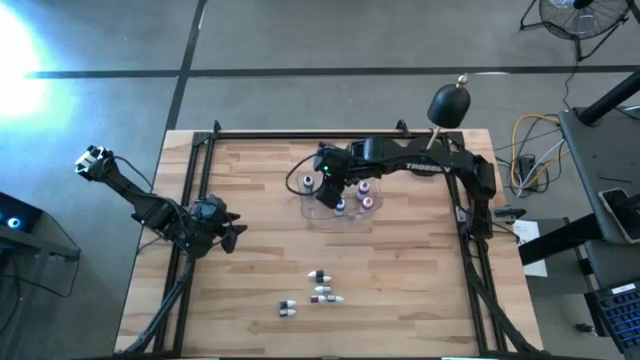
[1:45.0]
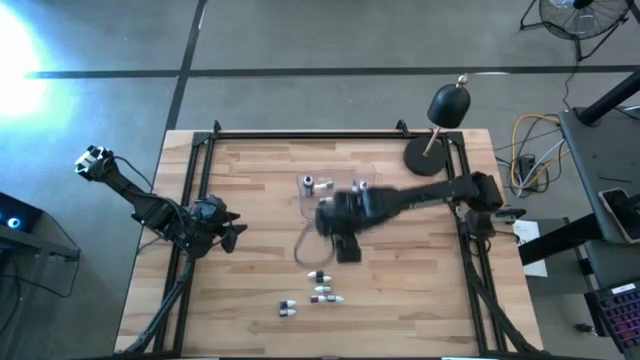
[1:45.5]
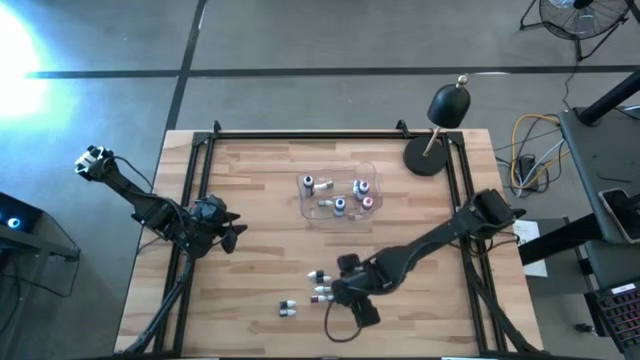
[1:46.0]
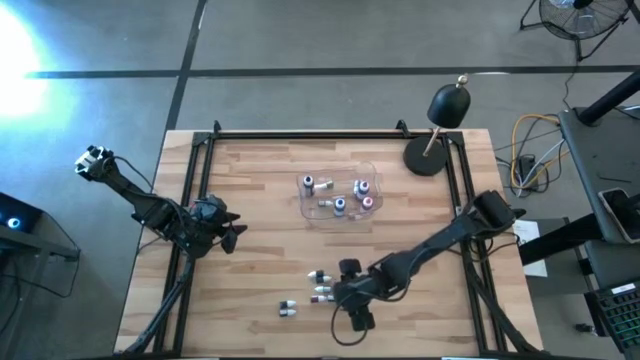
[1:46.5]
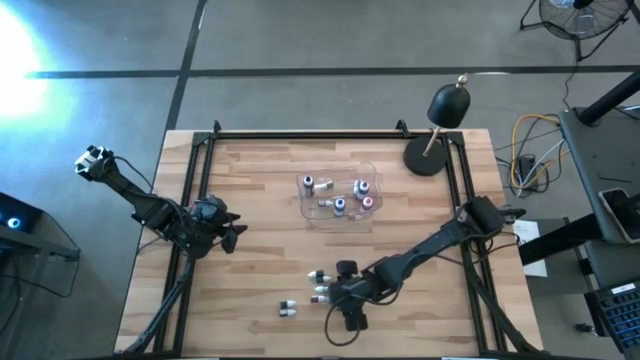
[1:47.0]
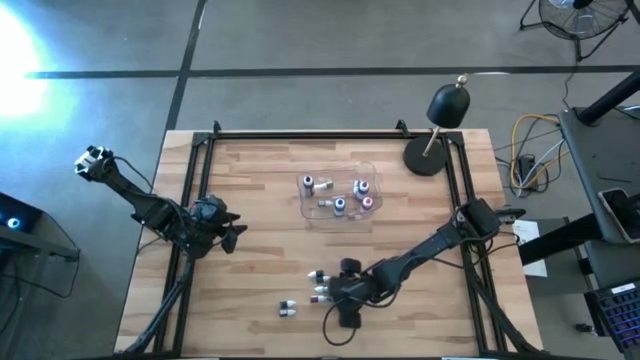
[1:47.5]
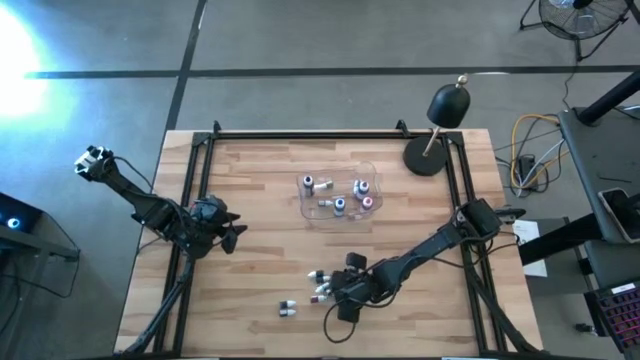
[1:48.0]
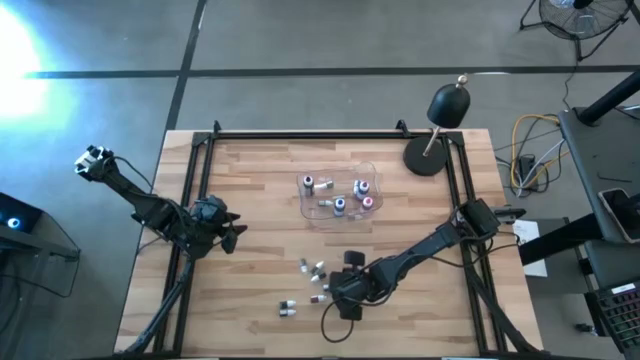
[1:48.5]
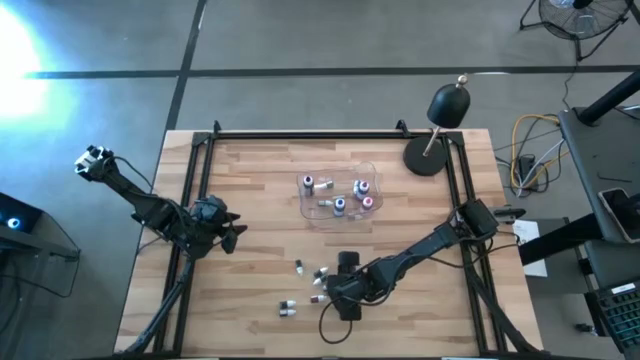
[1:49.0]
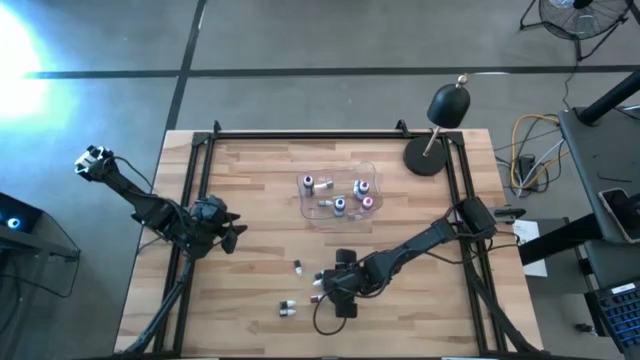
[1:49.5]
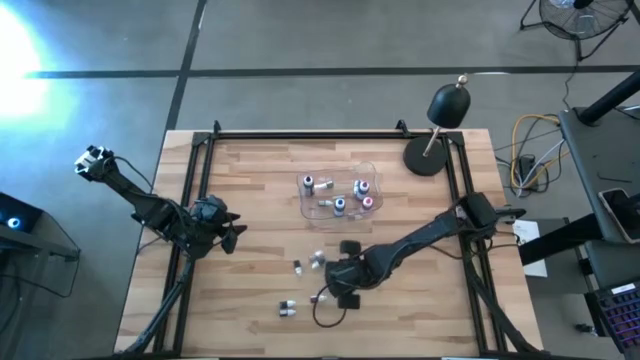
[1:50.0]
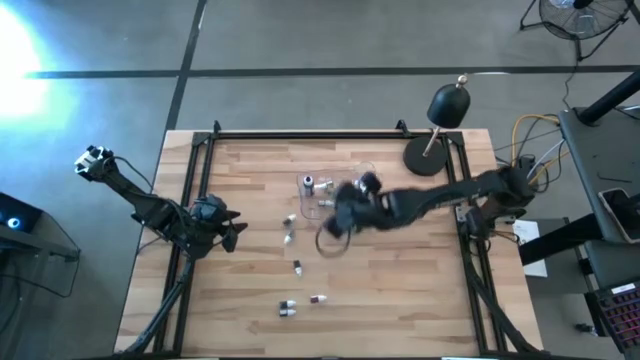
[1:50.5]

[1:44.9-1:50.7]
Task: Pick & Place food coloring
Put the right small violet food coloring bottle into the transparent bin

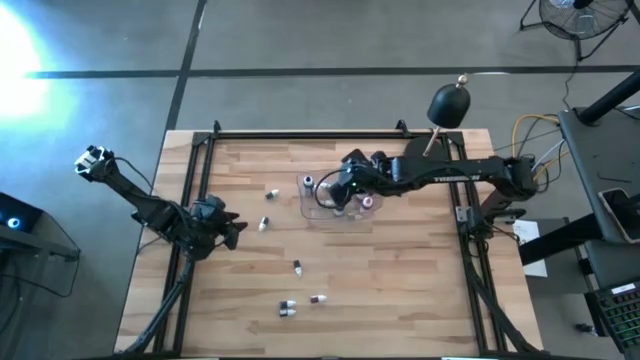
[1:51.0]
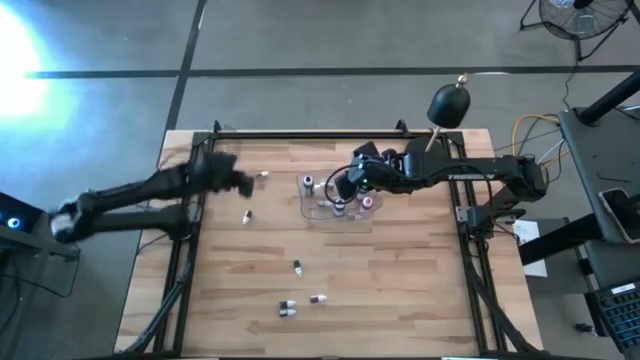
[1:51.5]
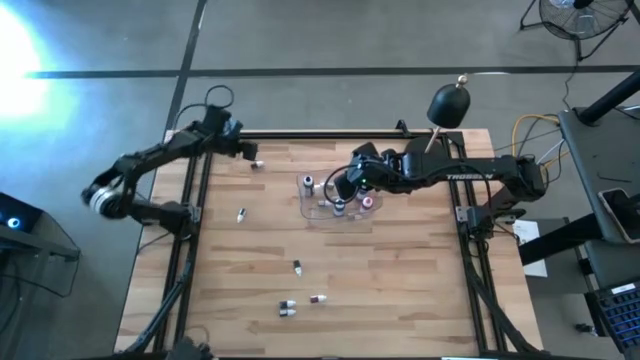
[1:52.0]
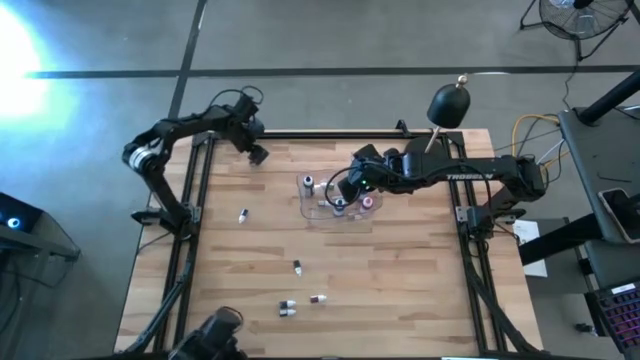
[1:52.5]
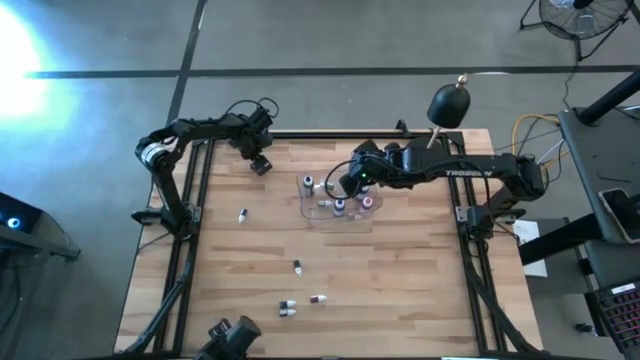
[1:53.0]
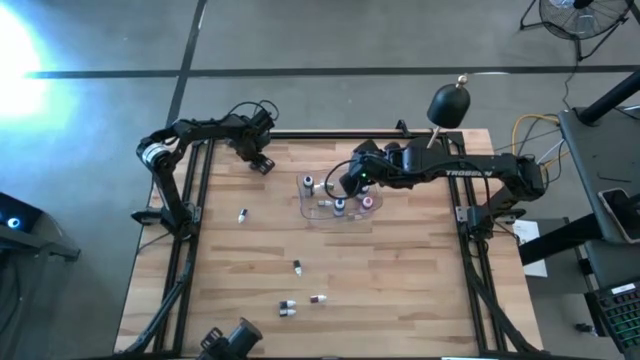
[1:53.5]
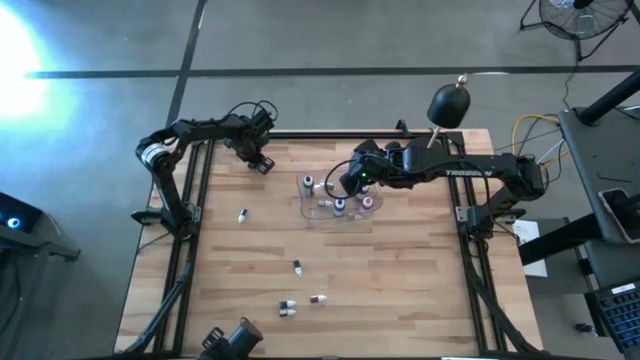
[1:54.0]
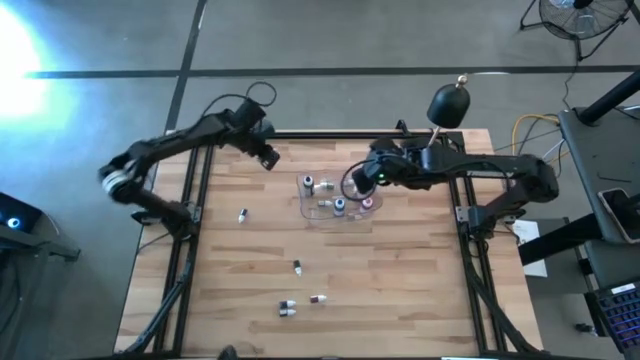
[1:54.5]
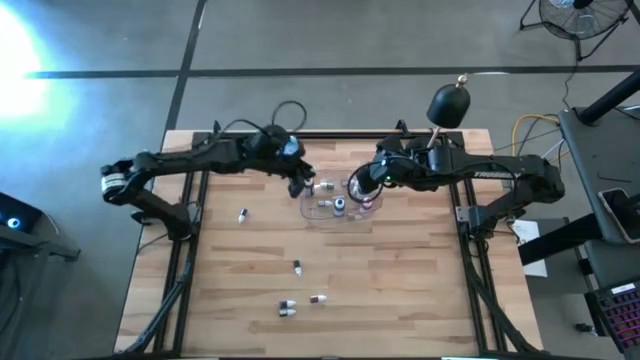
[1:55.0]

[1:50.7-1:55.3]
Put the small black food coloring bottle into the transparent bin

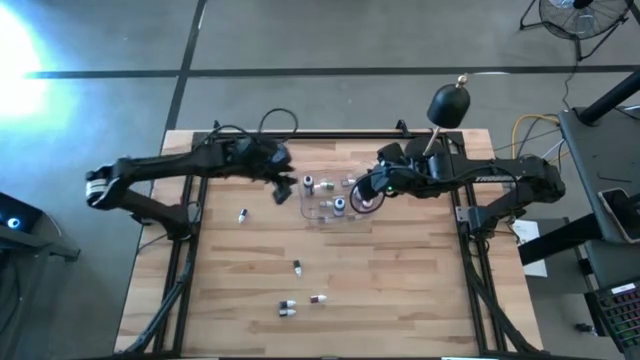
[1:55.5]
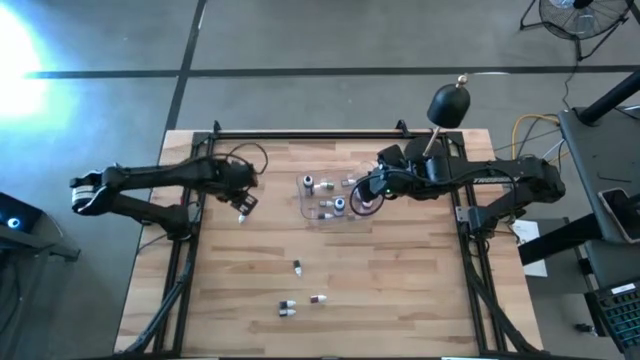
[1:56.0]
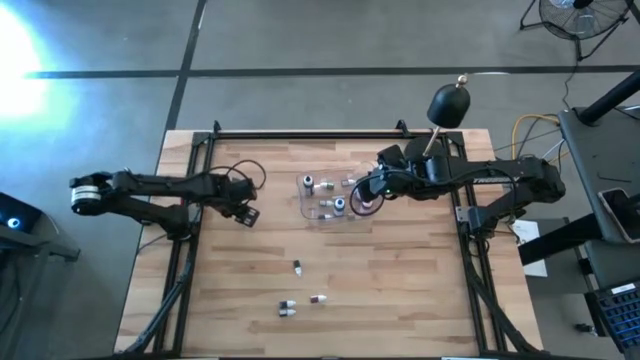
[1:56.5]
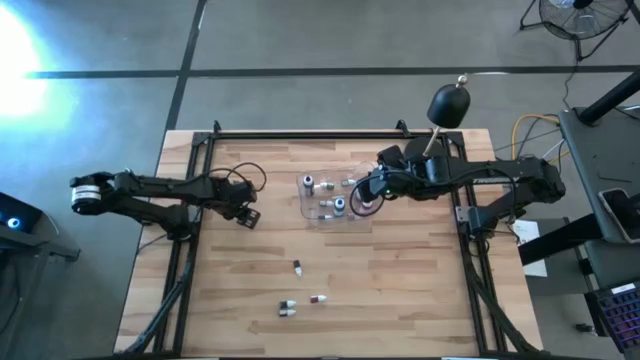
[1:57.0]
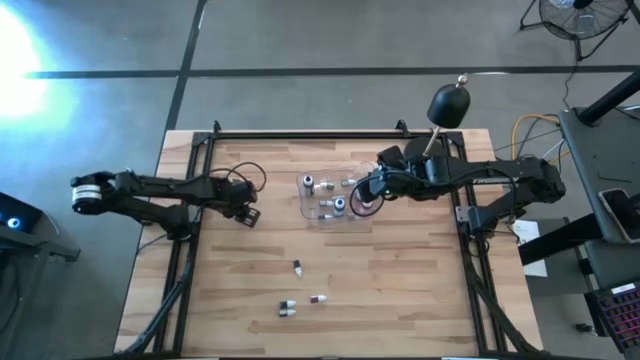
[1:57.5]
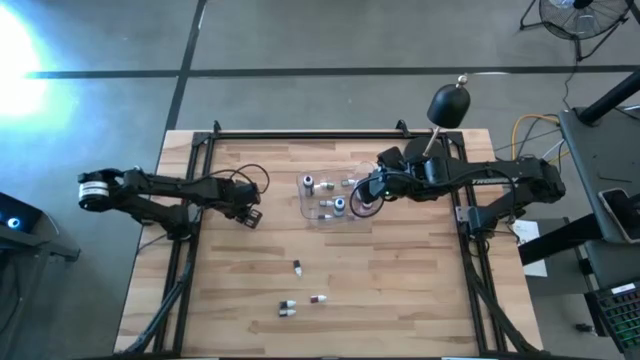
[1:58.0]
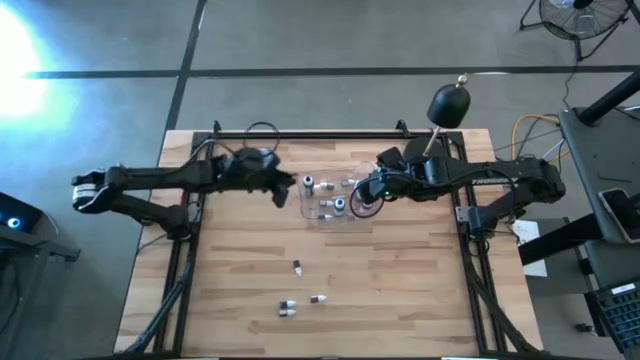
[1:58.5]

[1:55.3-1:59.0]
Put the top small blue food coloring bottle into the transparent bin

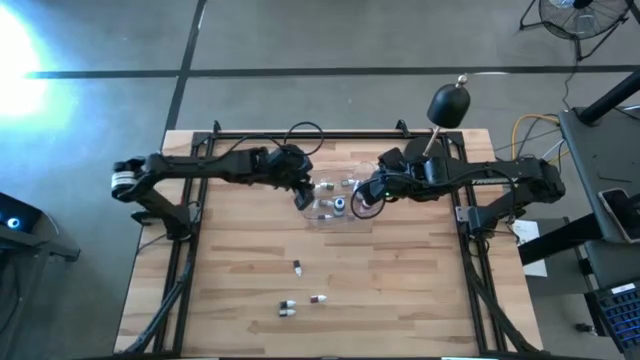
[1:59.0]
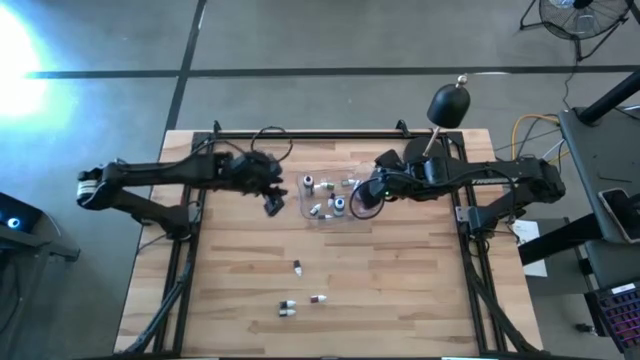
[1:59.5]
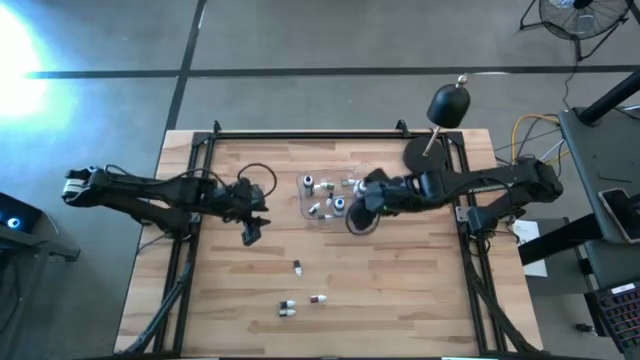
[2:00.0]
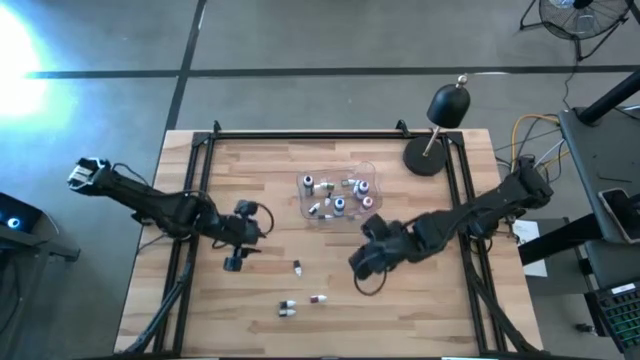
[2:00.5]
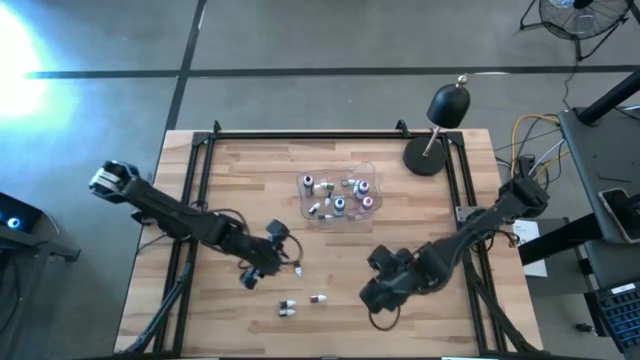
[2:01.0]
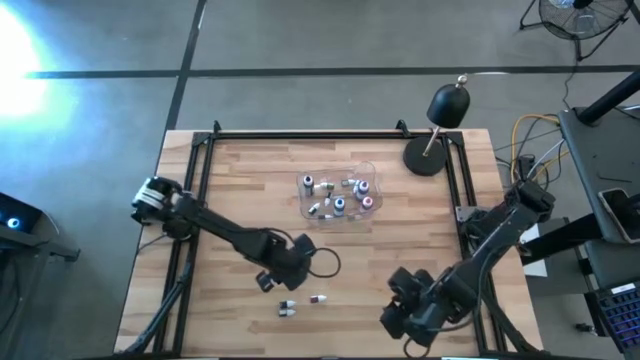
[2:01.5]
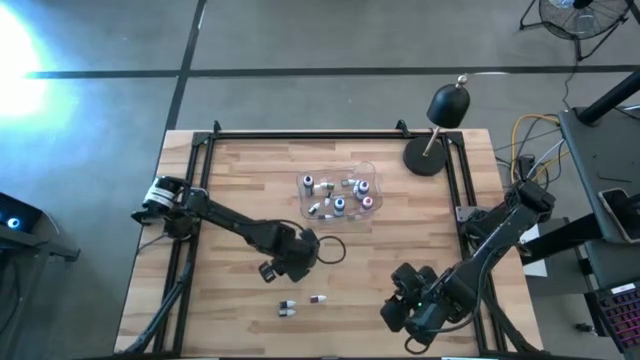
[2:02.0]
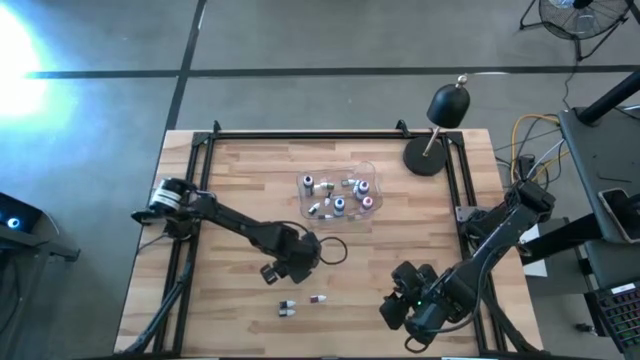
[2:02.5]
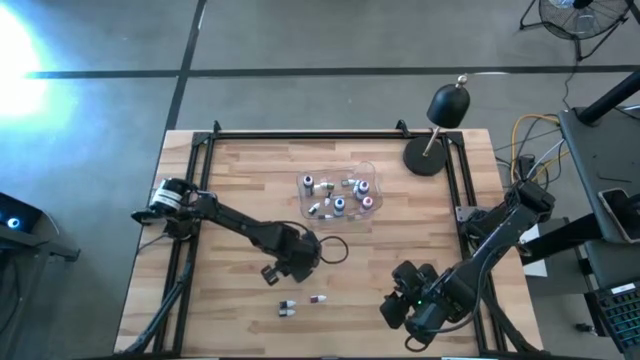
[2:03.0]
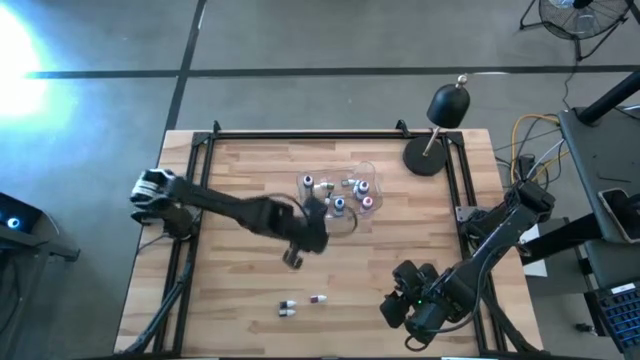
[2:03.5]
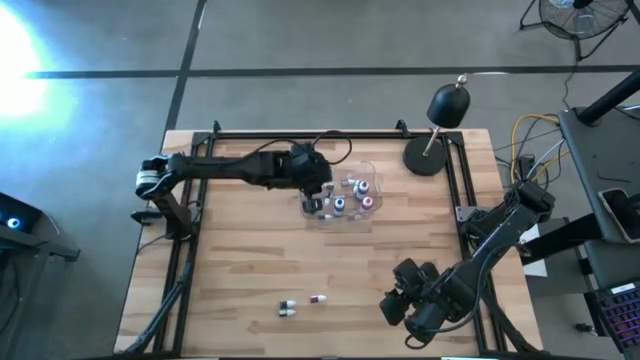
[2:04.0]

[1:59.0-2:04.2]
Put the small green food coloring bottle into the transparent bin

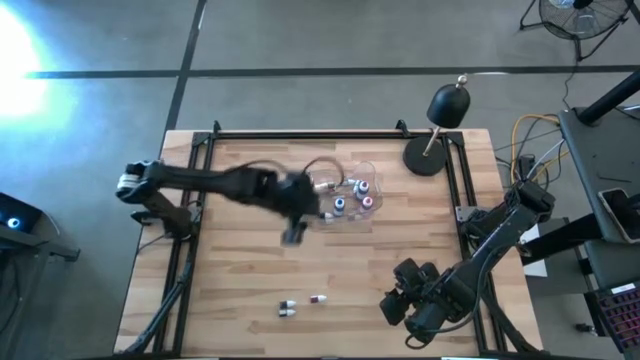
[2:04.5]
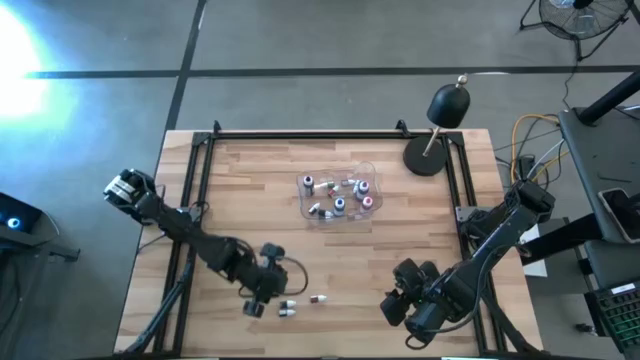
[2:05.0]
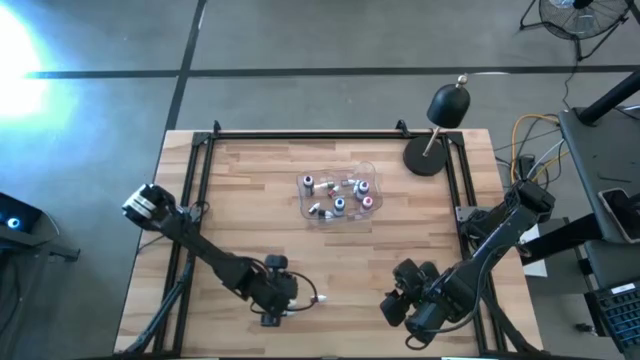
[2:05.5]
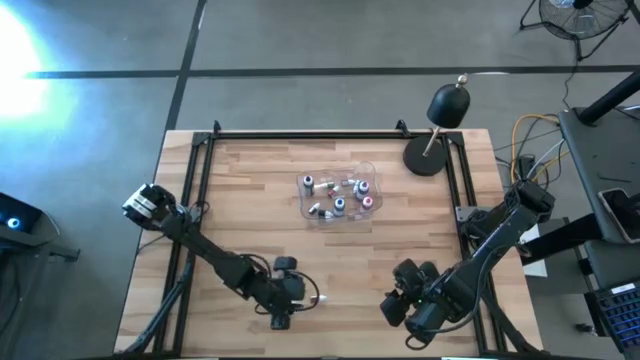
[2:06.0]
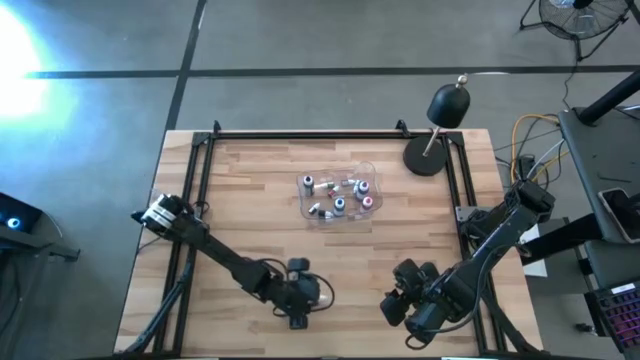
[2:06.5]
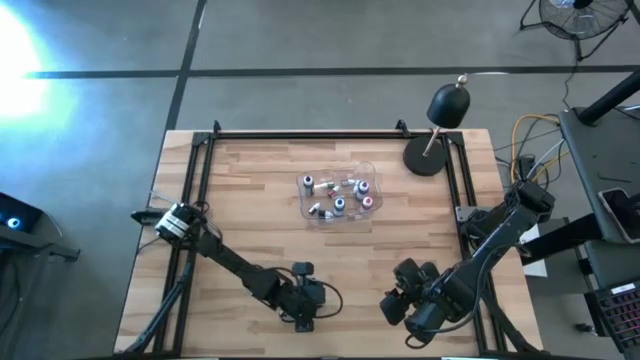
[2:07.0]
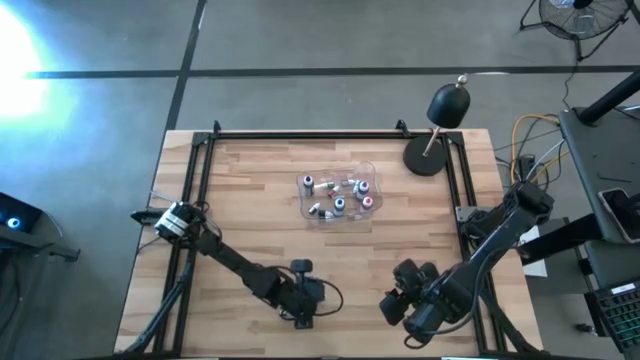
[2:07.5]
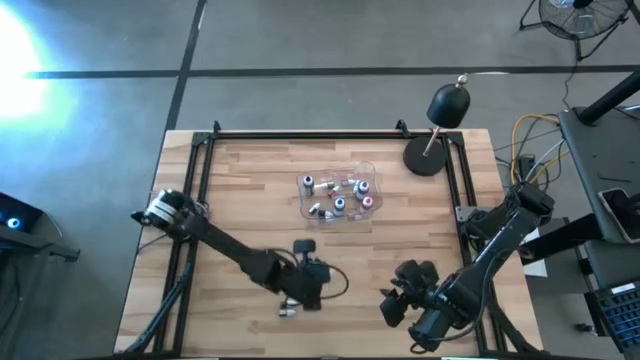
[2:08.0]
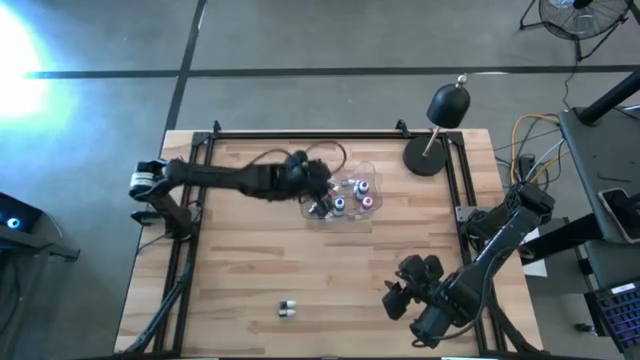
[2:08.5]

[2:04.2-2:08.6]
Put the small red food coloring bottle into the transparent bin
